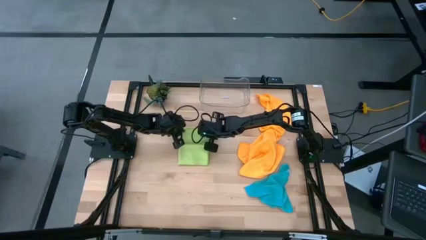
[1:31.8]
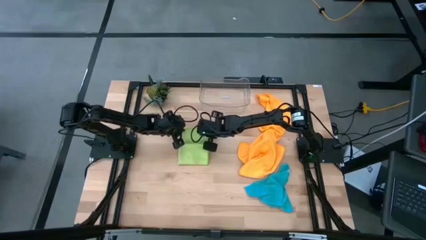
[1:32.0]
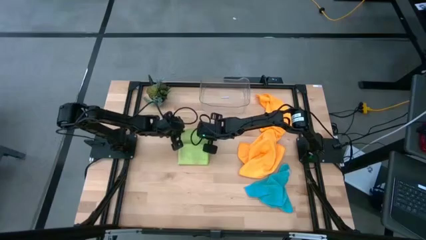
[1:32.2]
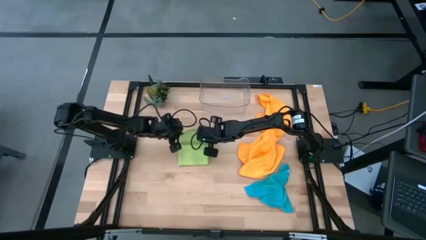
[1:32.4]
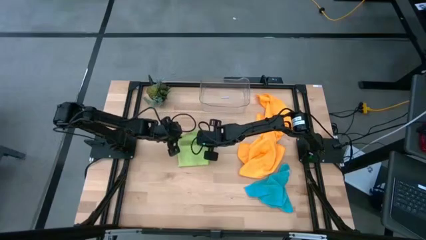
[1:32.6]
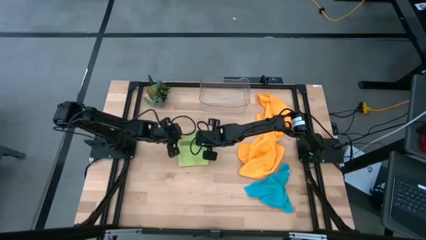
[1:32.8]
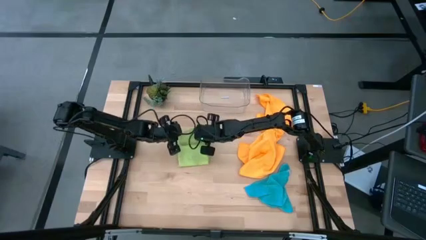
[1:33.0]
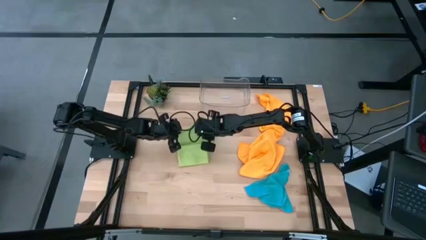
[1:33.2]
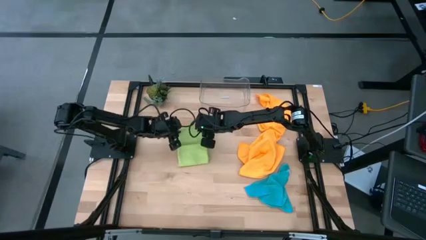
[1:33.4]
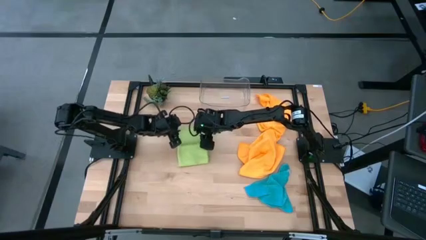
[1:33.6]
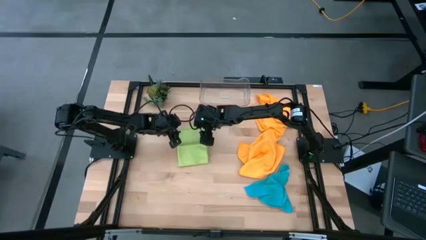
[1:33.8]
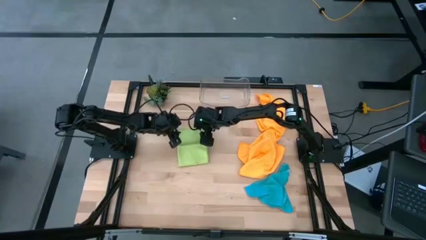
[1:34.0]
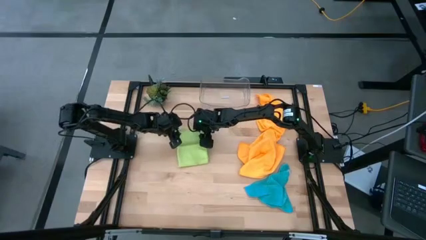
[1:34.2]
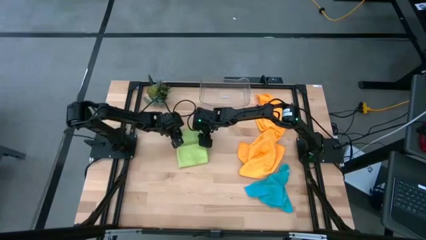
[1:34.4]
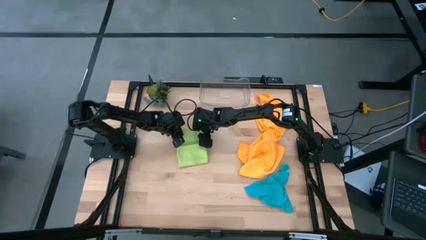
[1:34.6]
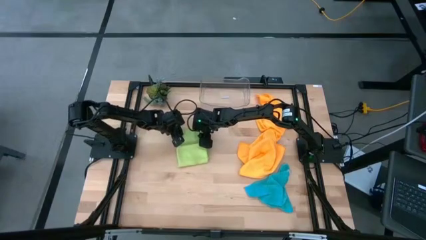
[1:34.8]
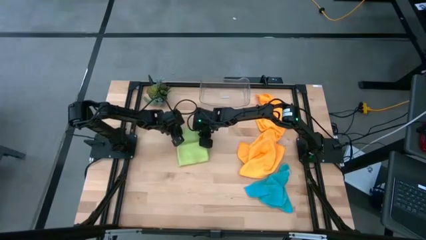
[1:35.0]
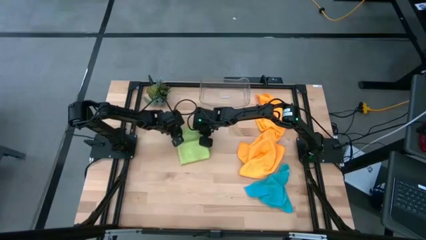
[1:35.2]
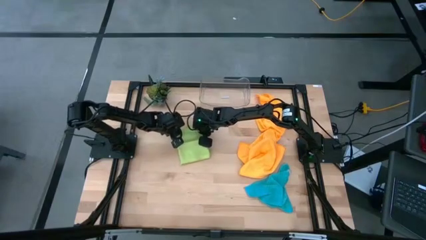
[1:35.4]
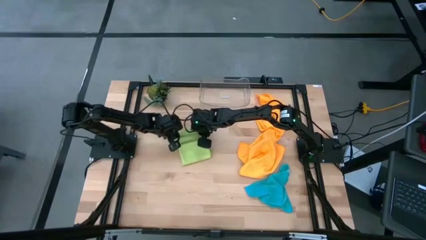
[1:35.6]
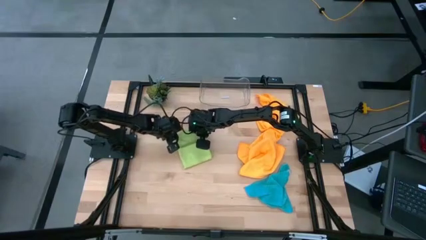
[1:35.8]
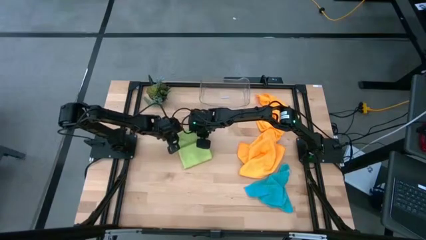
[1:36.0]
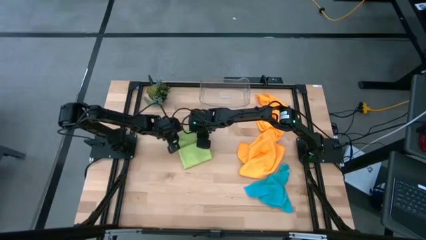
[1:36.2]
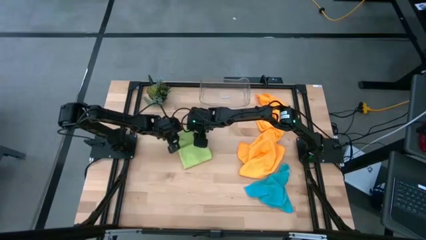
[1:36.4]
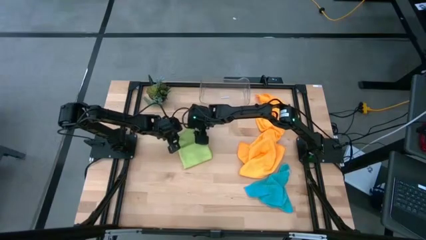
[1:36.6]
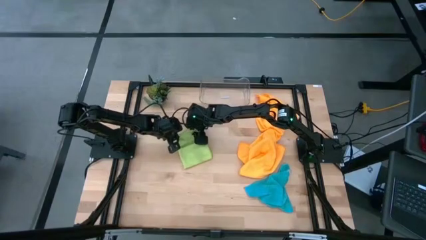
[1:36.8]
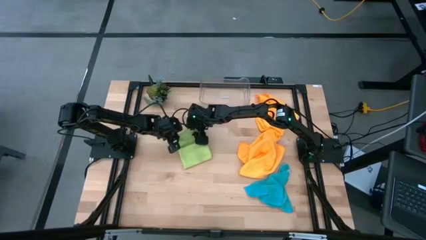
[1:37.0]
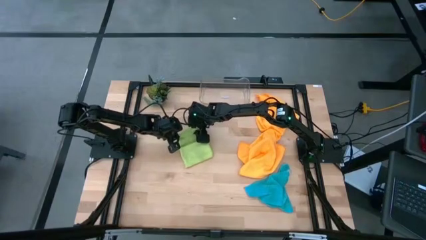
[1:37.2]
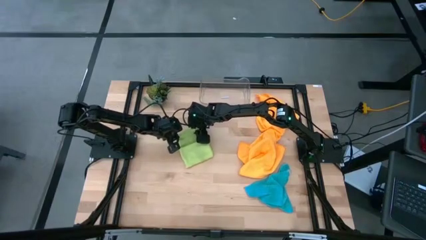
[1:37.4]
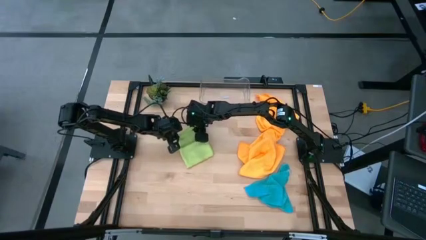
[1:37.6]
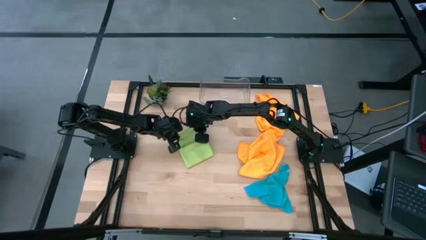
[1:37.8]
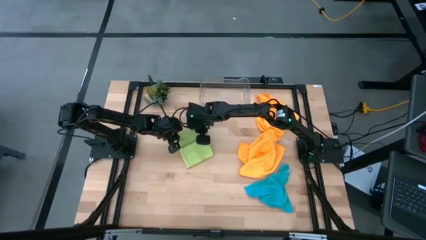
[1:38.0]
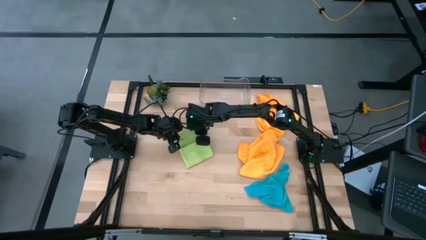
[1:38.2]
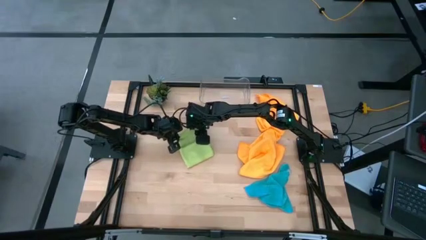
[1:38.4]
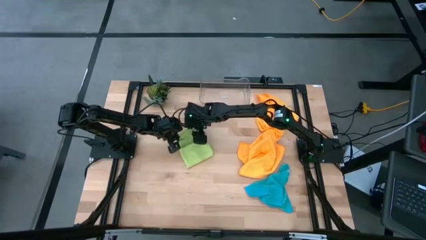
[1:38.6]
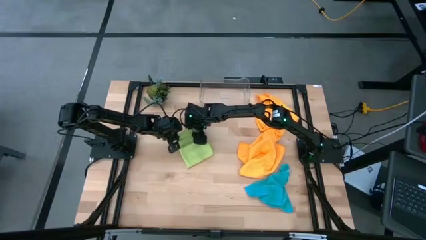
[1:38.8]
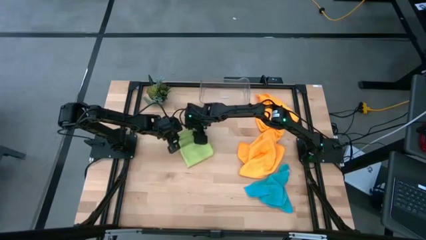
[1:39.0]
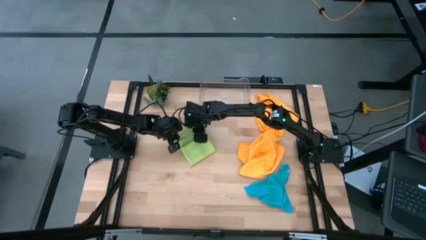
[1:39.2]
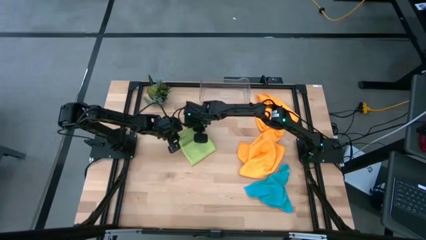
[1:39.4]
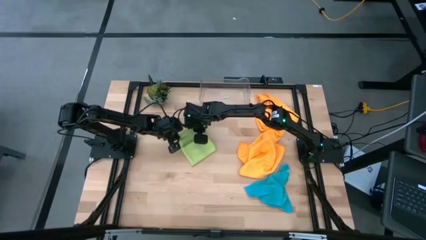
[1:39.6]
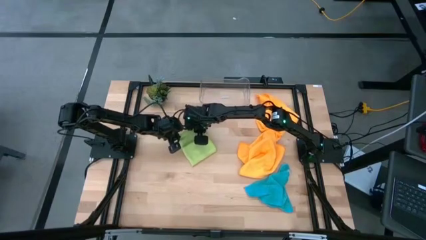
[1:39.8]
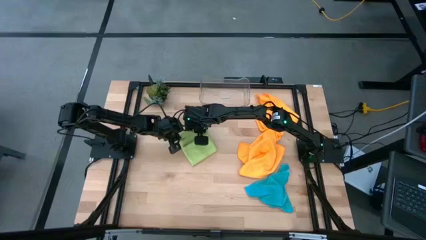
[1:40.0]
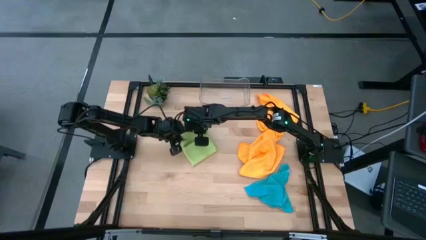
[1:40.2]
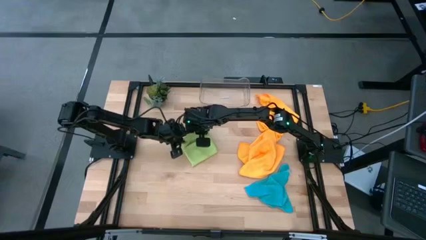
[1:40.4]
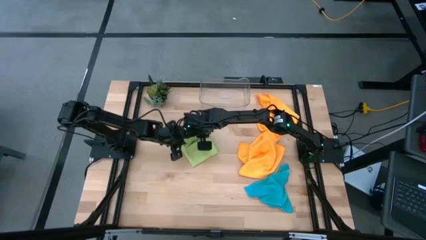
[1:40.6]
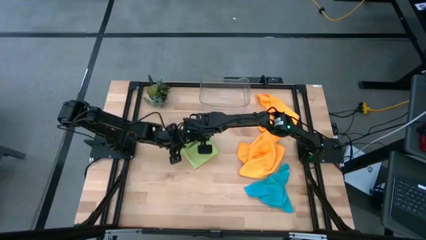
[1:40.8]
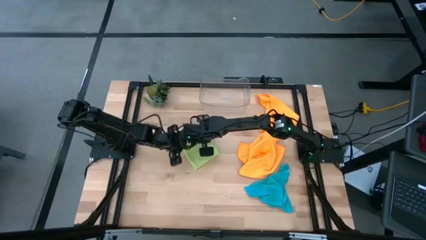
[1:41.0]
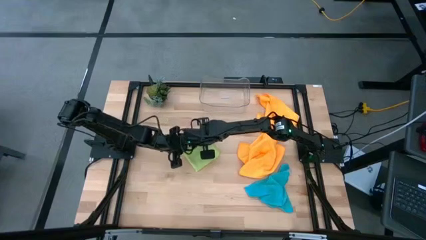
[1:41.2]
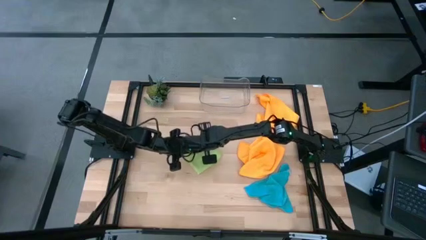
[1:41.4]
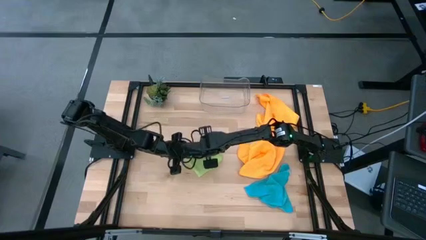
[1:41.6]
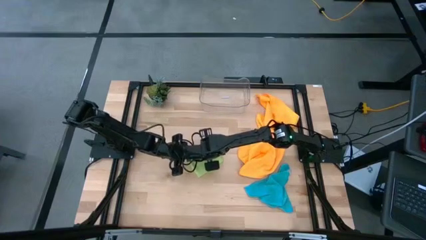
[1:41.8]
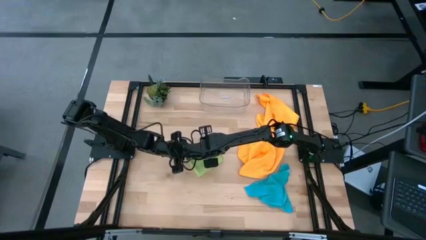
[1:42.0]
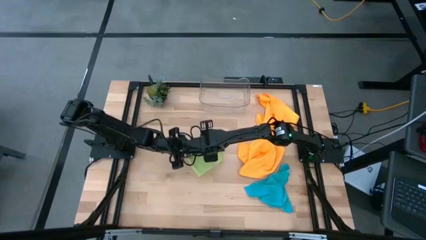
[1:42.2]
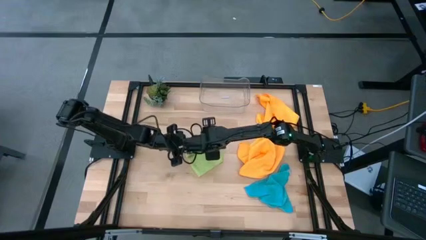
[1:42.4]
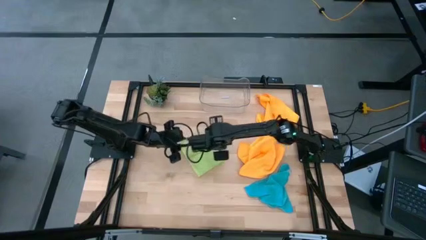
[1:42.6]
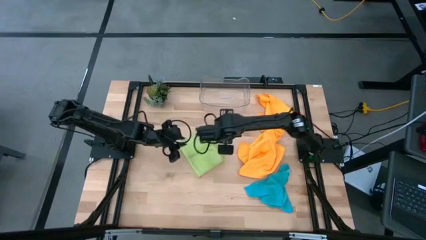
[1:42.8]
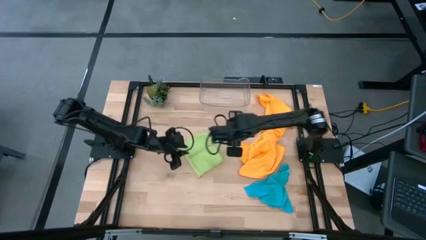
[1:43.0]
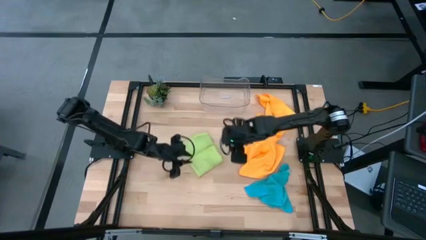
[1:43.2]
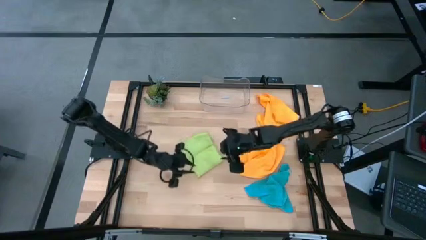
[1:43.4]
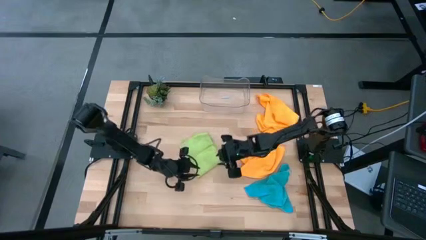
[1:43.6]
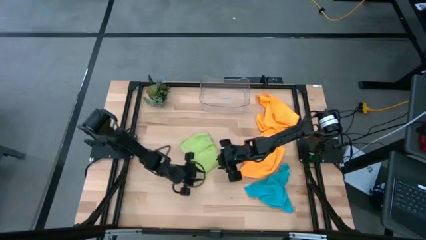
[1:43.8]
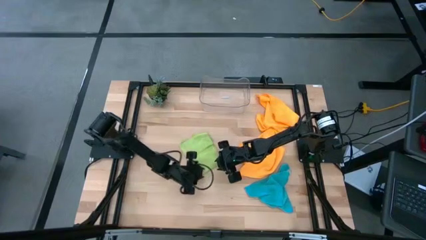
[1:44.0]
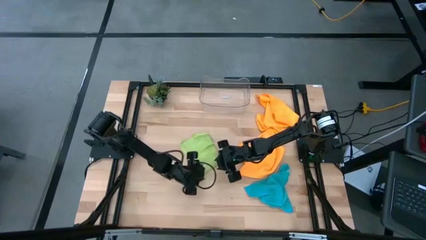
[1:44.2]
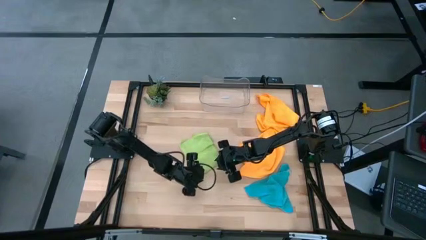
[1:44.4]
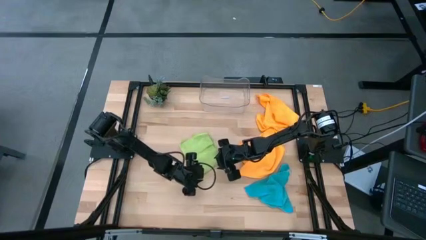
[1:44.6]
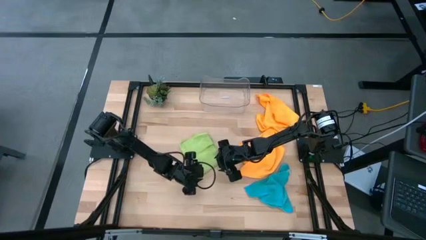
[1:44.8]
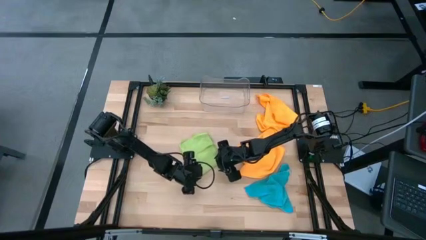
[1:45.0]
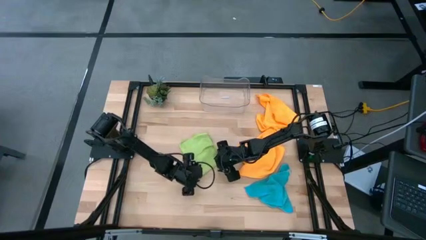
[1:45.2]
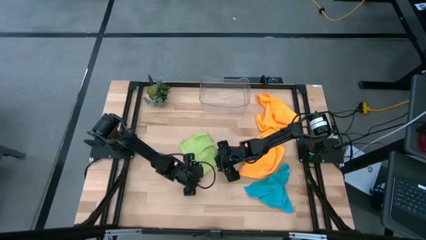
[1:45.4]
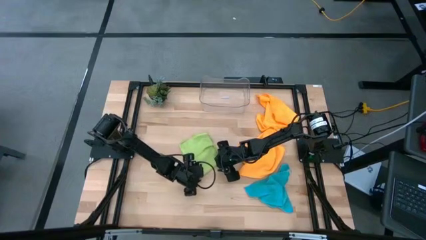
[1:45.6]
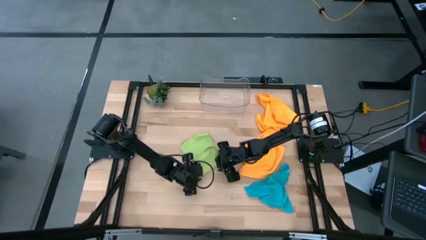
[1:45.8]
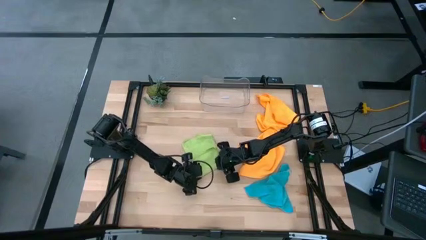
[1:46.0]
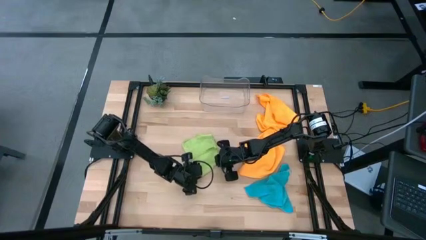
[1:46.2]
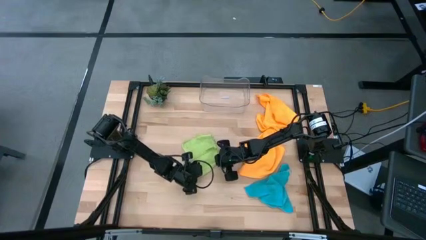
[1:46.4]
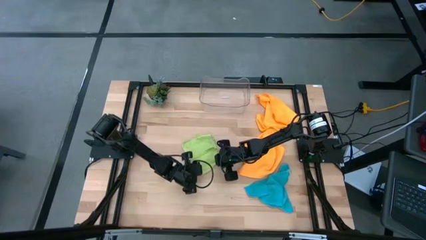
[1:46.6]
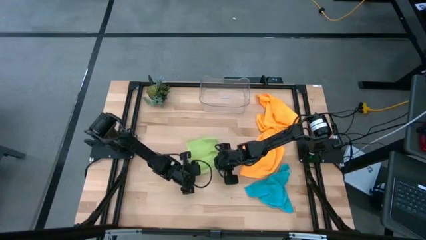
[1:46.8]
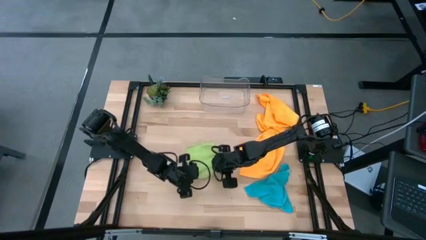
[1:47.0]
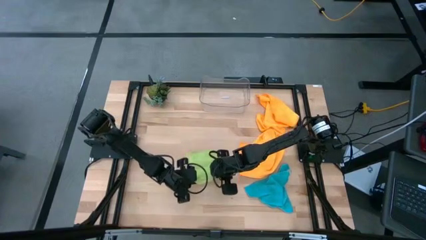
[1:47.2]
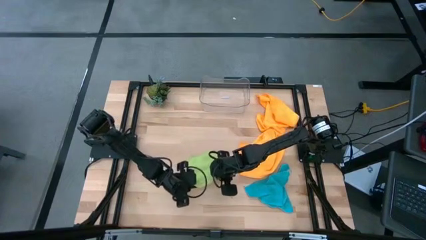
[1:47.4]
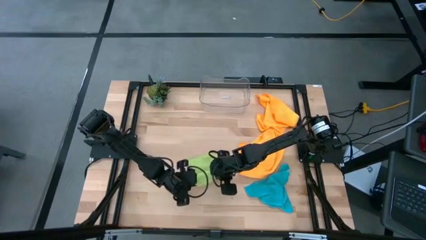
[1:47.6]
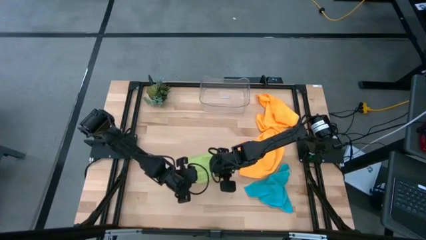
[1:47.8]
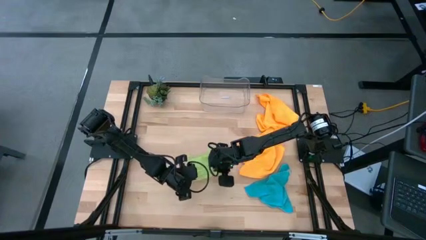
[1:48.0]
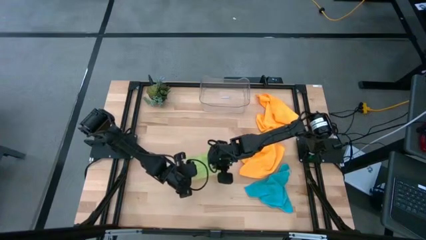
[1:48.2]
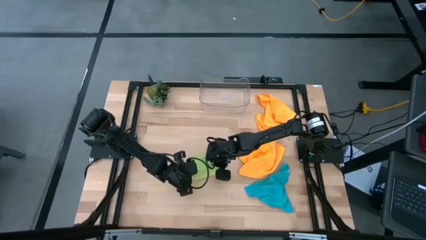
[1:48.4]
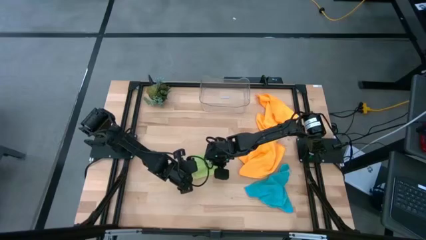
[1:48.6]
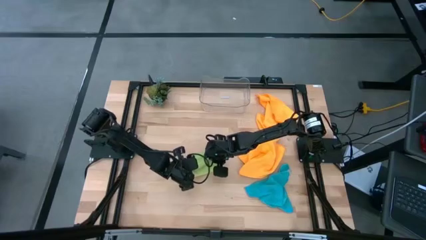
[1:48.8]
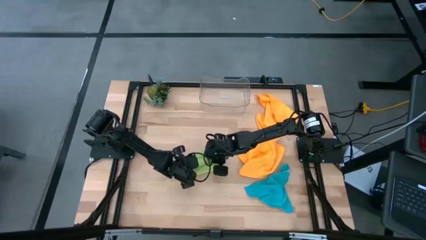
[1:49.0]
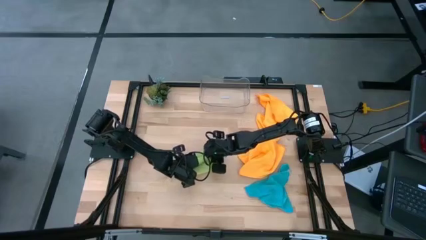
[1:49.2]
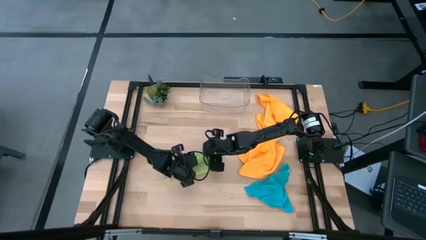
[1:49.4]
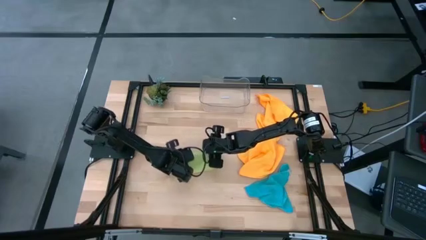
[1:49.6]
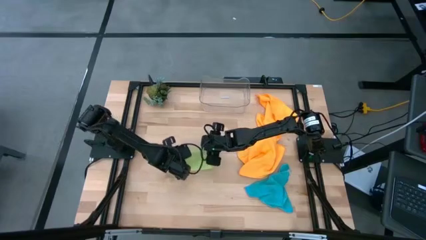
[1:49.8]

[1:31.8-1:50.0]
Task: Fold microfiber towels
Fold the green microfiber cloth
